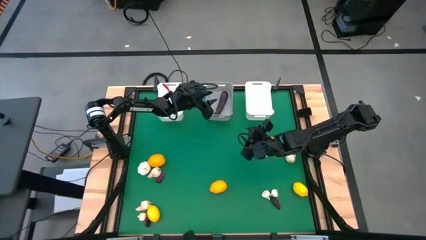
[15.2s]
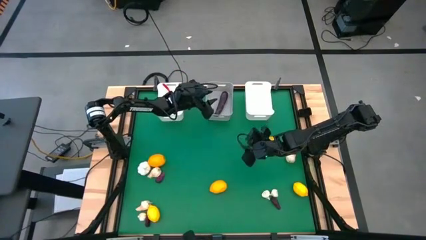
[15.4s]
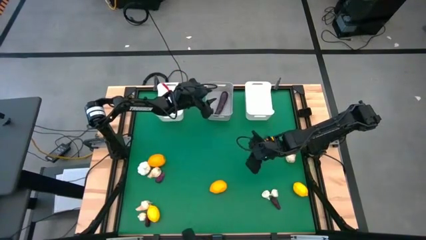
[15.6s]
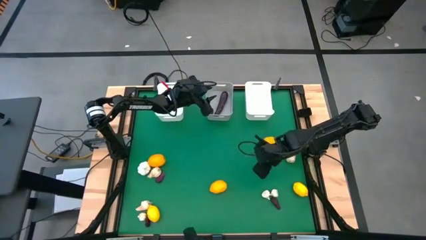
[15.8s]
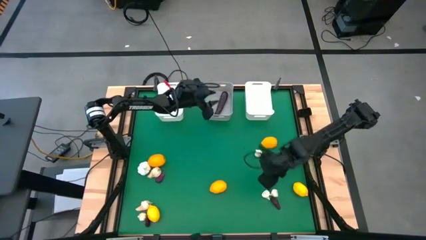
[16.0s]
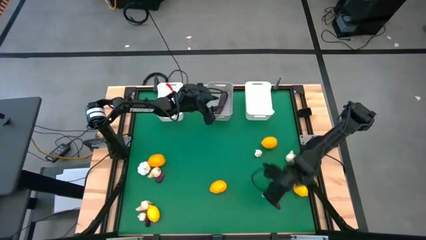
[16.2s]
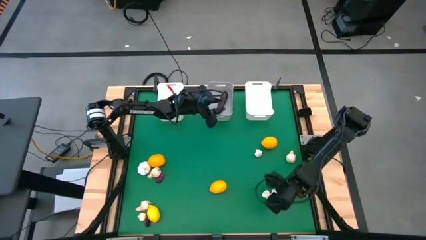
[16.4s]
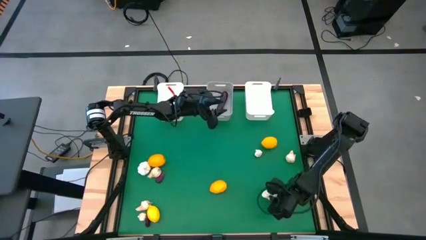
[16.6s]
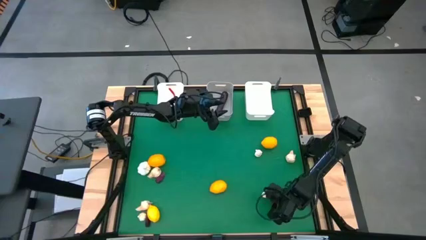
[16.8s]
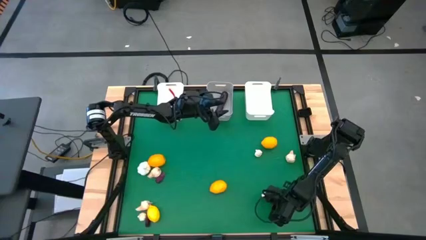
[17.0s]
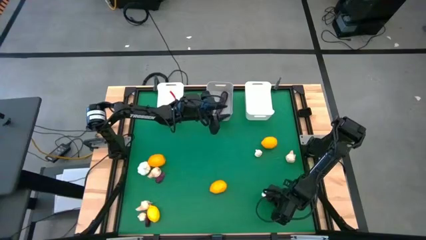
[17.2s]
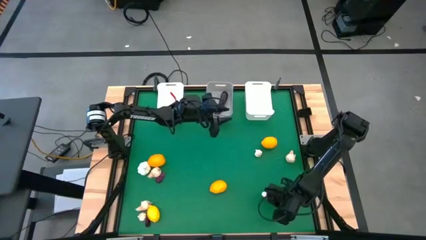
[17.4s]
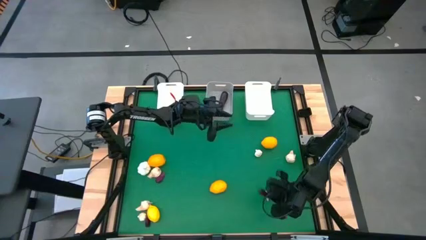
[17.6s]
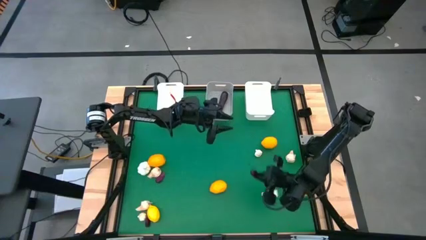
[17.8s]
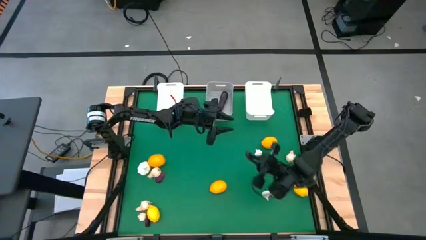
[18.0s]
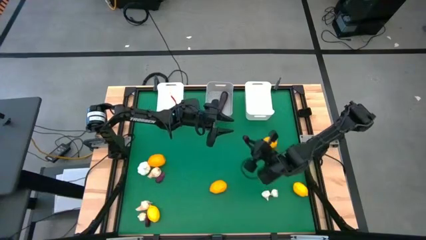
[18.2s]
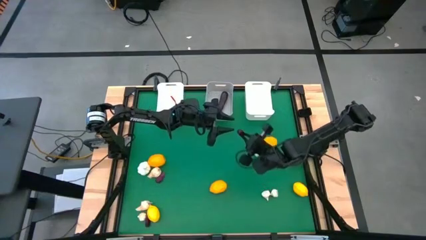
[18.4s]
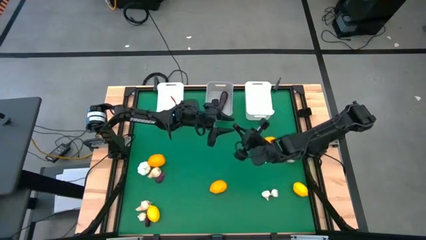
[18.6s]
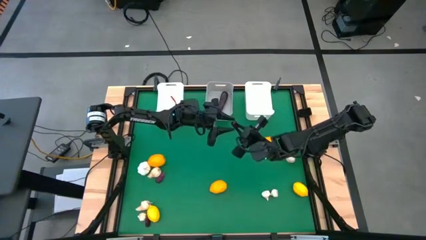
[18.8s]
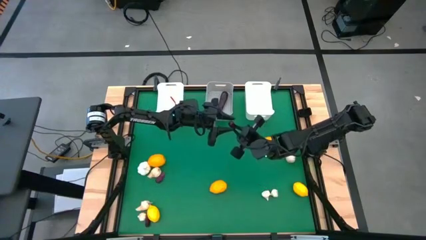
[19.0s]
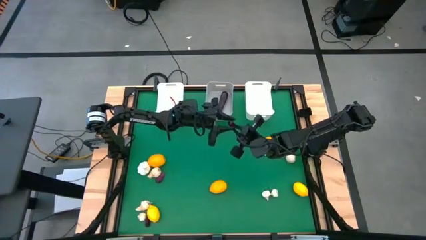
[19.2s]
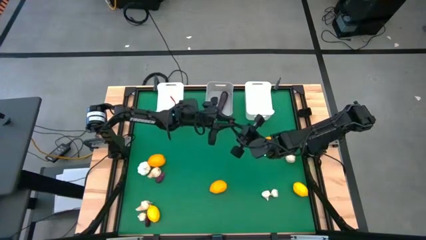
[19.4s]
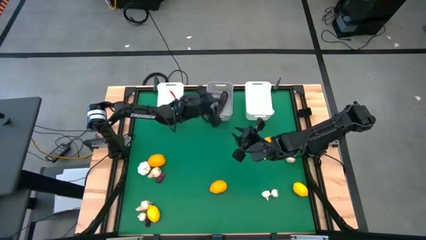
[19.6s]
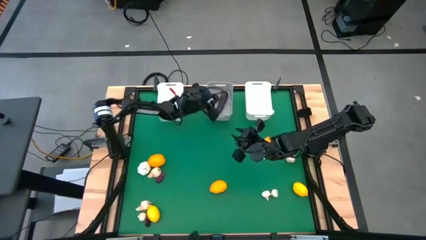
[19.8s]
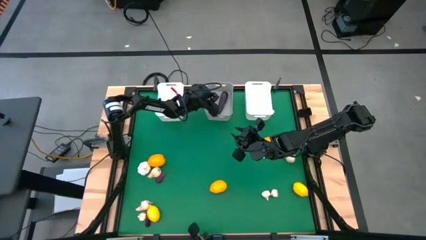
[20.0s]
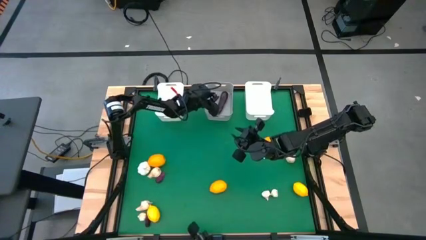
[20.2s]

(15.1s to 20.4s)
Task: Sort produce into baskets
Put the eggplant into the gray bin

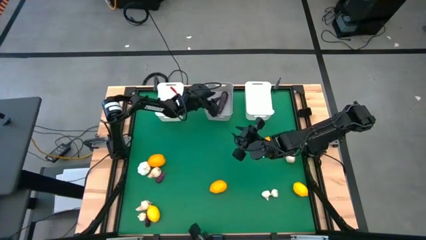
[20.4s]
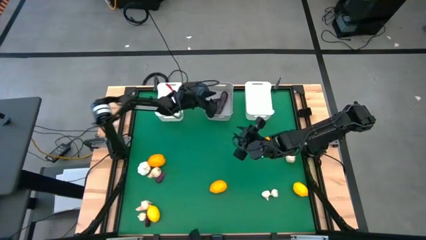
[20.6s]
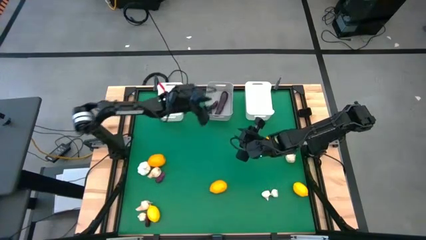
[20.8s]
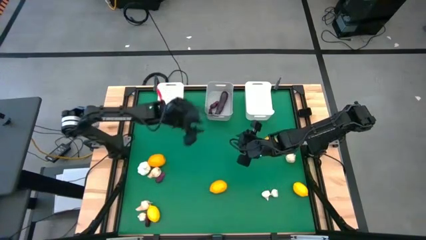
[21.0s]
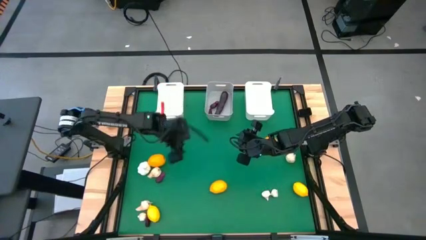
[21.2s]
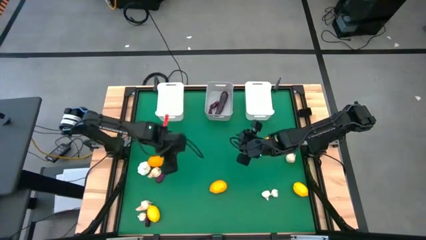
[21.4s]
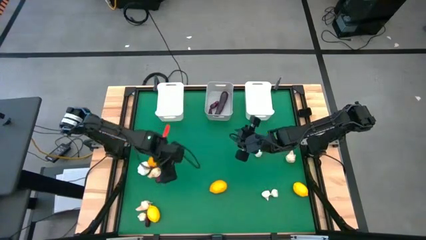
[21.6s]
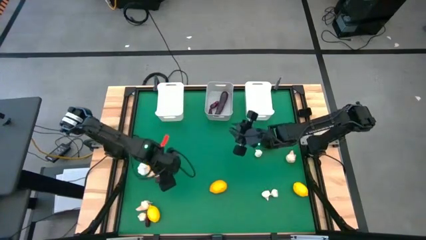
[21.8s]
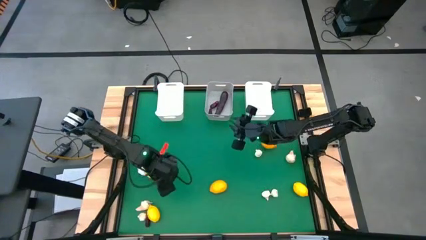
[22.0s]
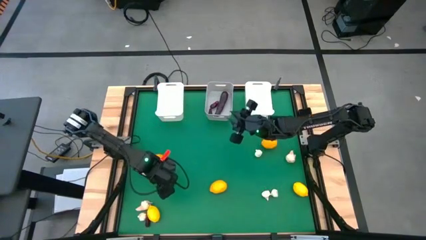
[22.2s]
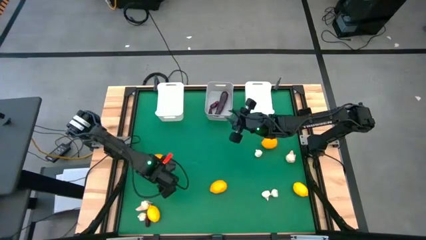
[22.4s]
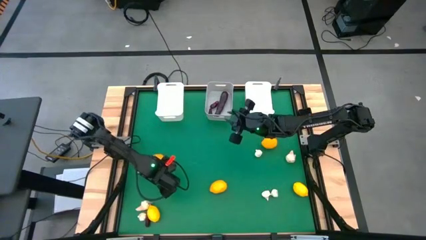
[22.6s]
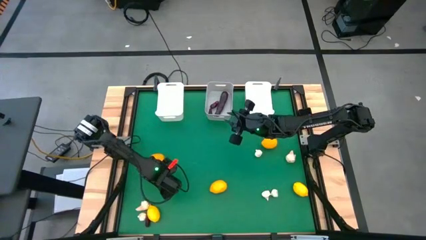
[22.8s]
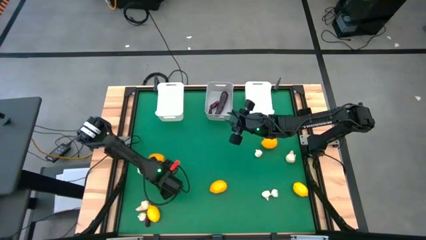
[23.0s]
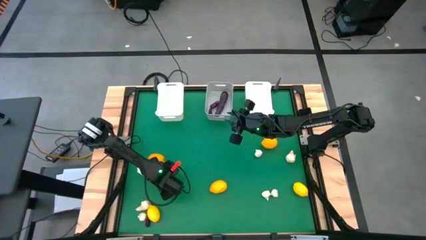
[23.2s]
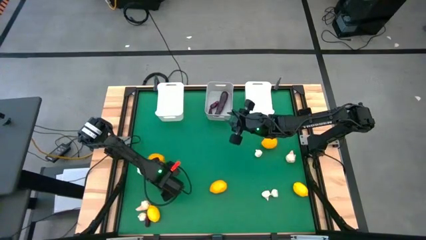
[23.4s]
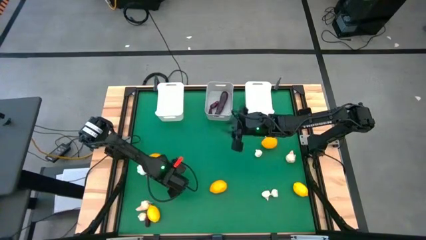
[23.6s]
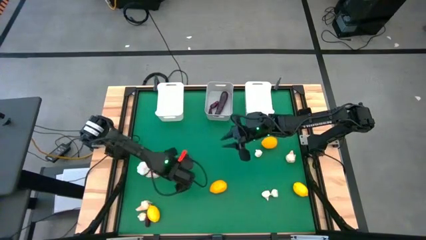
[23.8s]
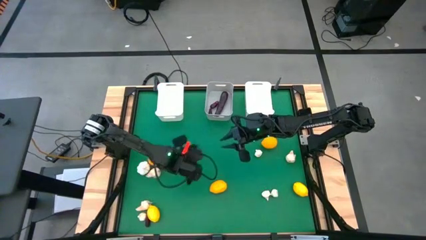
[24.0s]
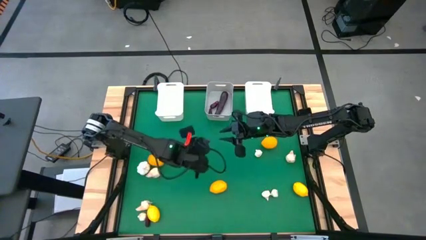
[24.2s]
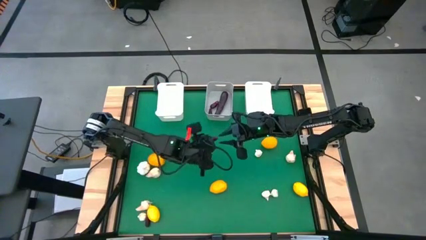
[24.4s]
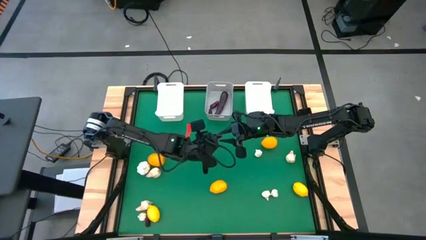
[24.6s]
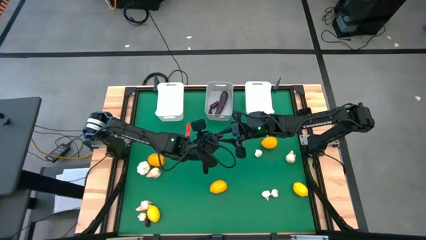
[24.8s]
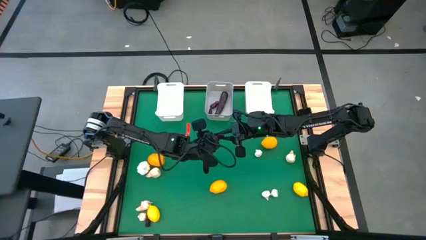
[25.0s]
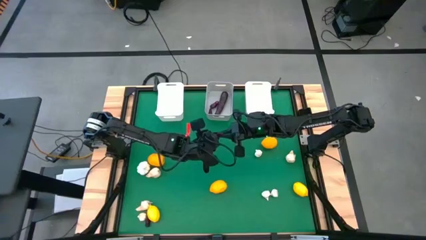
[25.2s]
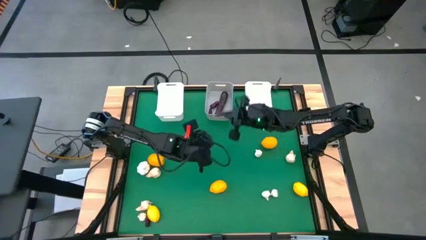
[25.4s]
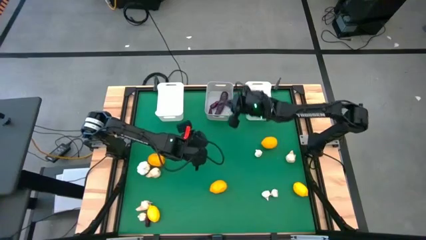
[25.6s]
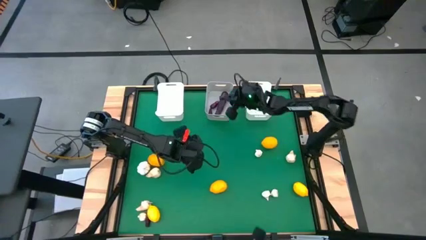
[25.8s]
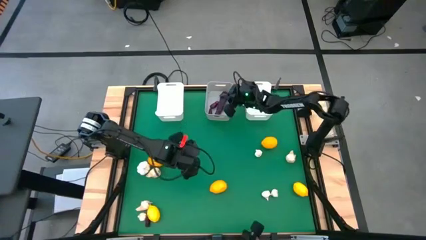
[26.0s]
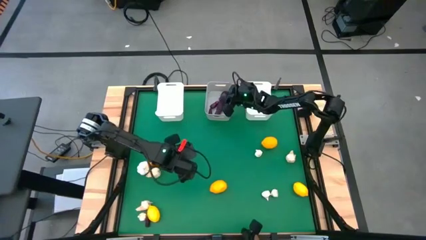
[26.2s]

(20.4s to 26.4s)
Put the eggplant into the gray bin

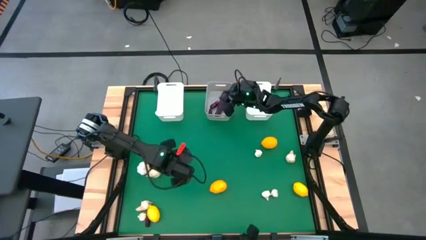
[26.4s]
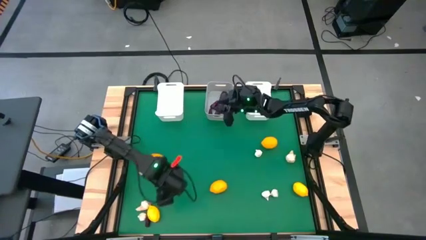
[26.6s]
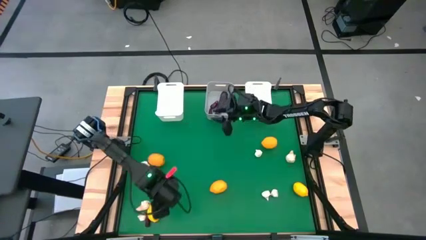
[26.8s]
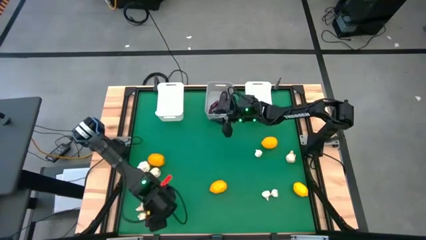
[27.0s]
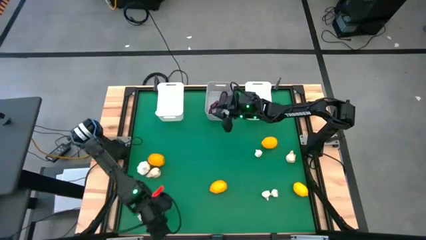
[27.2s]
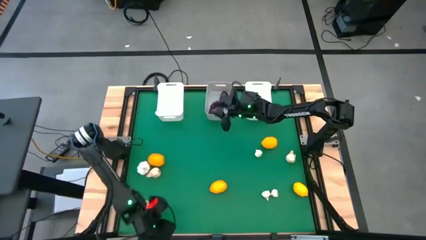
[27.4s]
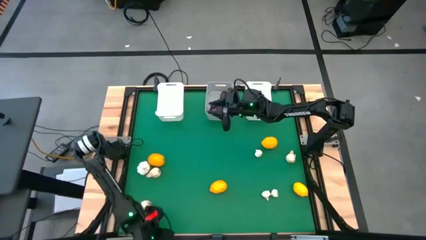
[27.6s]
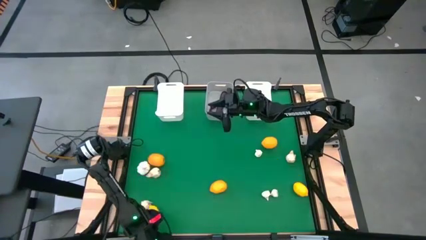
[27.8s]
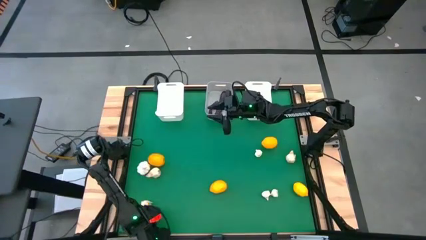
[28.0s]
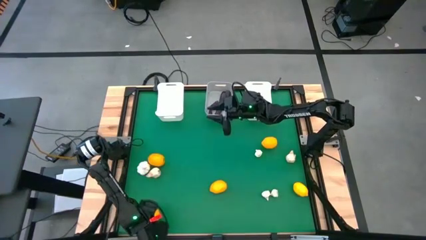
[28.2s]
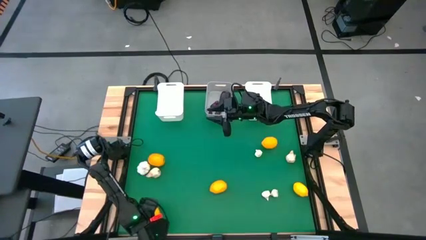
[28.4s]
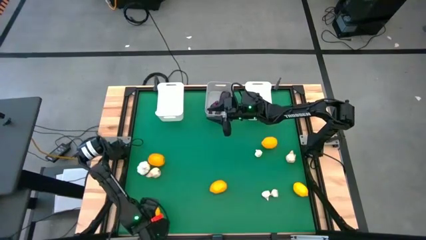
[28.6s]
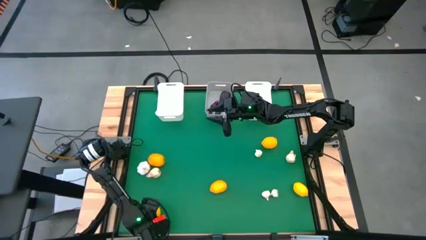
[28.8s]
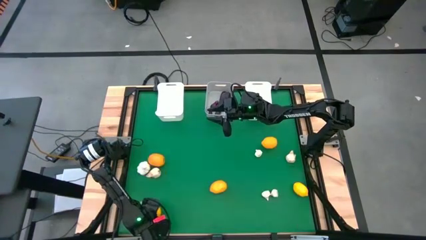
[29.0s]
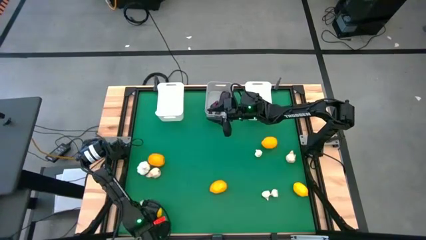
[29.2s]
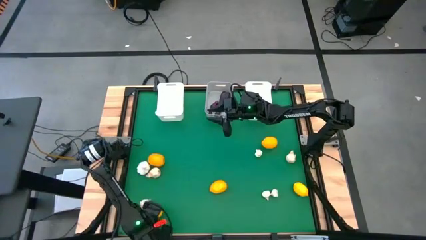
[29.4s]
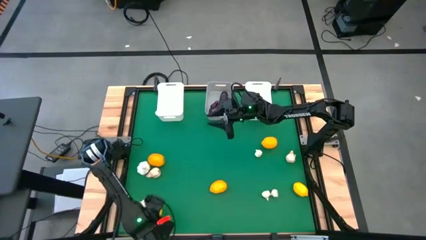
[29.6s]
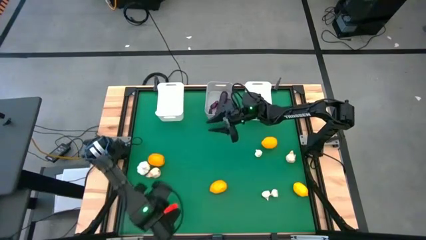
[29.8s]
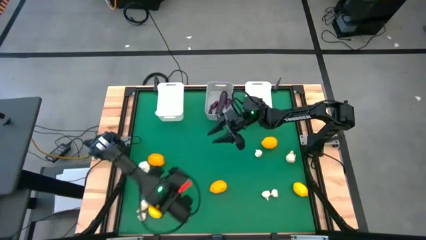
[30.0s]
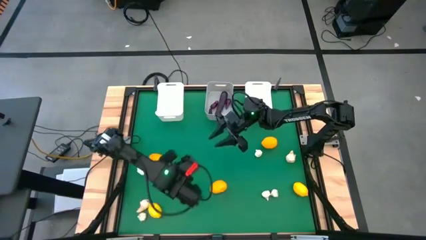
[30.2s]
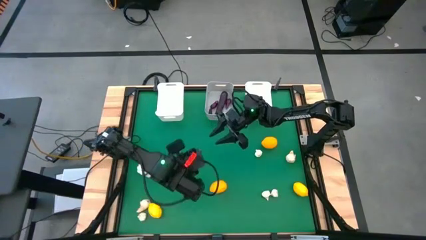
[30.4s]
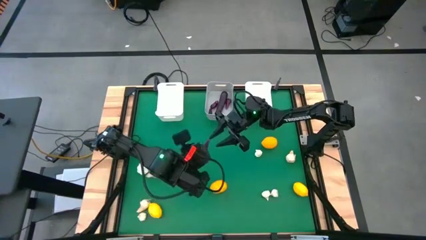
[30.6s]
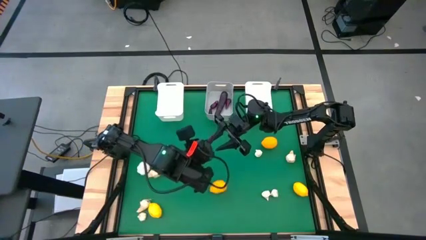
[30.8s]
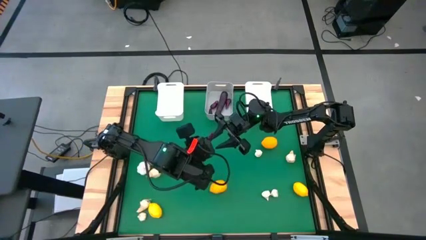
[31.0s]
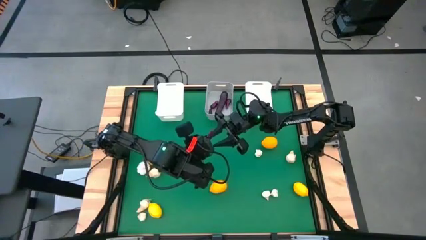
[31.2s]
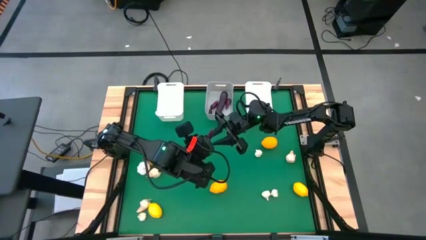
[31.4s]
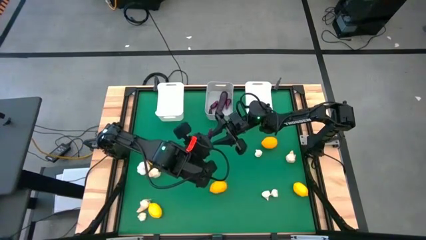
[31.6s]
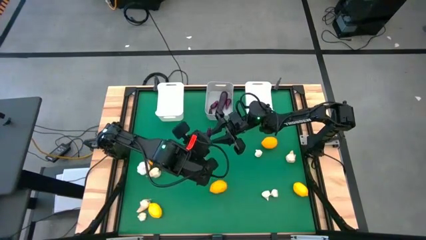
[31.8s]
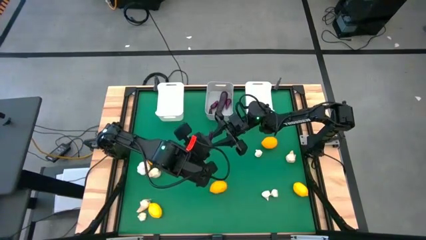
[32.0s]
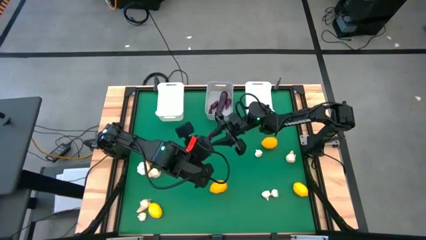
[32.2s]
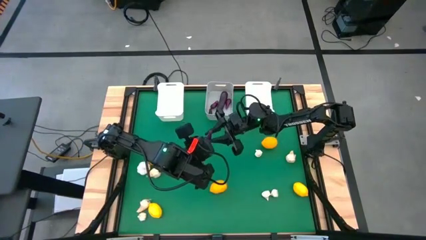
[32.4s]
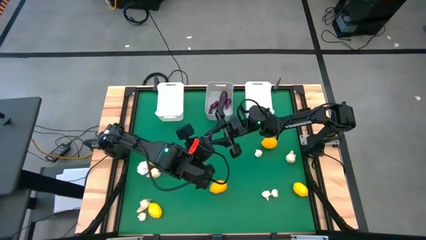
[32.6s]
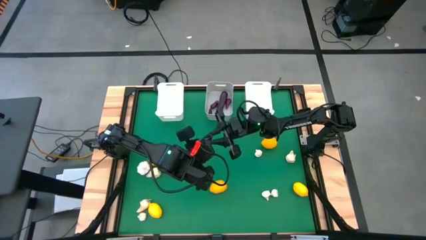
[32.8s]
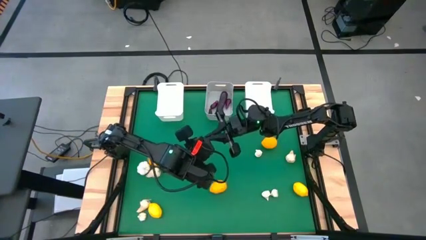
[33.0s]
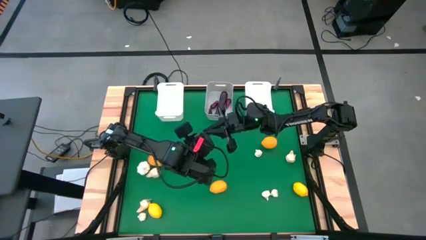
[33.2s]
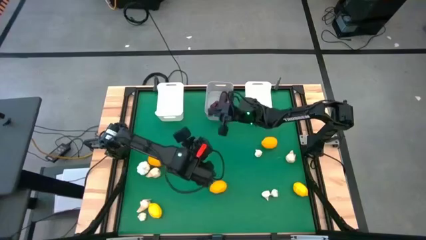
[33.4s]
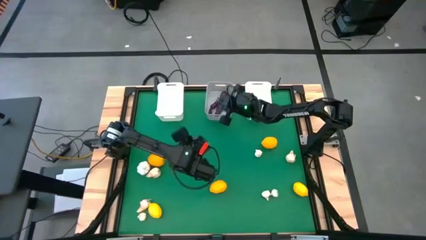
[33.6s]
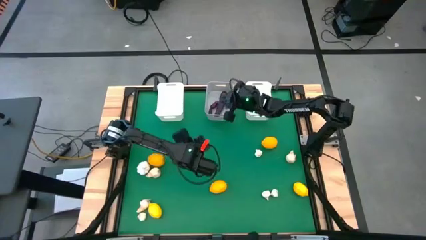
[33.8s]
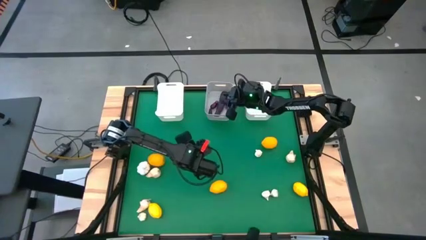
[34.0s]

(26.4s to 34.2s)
Put the eggplant into the gray bin
